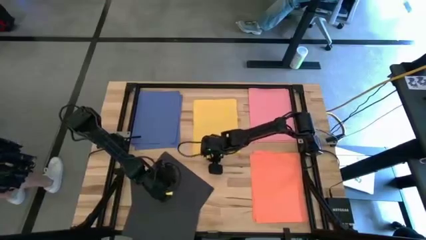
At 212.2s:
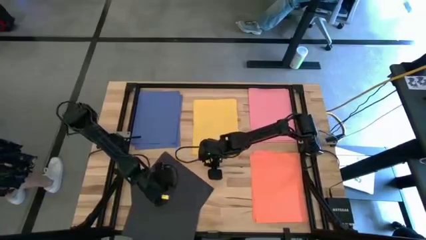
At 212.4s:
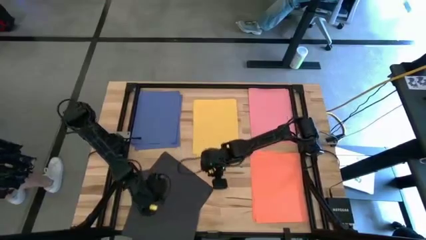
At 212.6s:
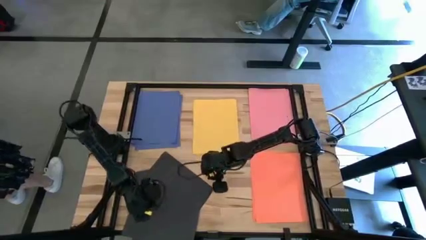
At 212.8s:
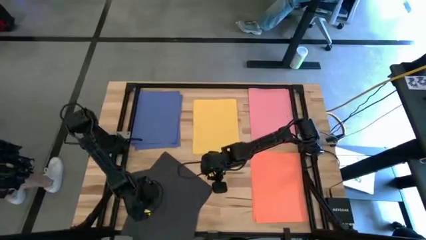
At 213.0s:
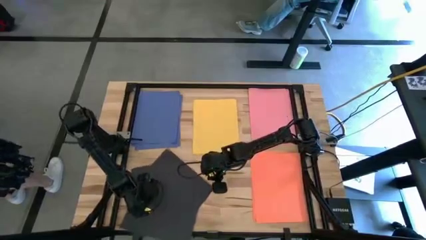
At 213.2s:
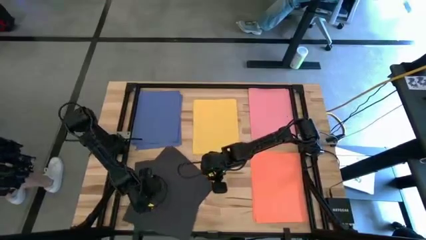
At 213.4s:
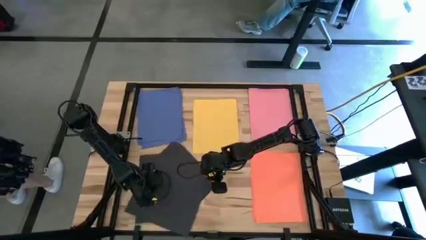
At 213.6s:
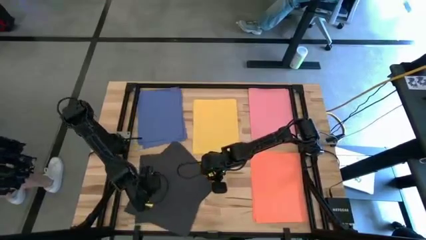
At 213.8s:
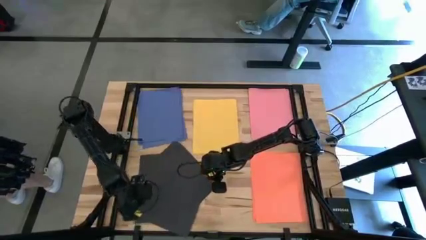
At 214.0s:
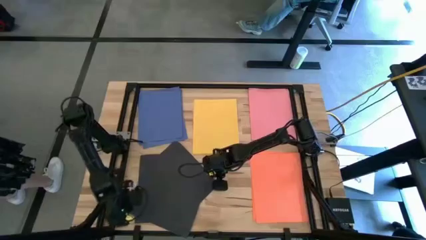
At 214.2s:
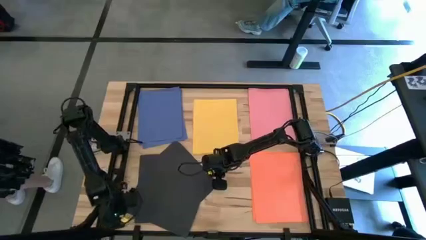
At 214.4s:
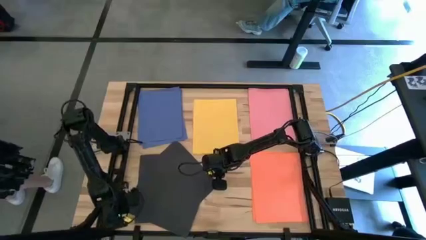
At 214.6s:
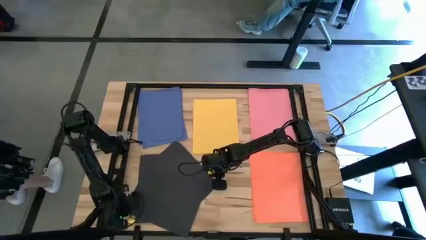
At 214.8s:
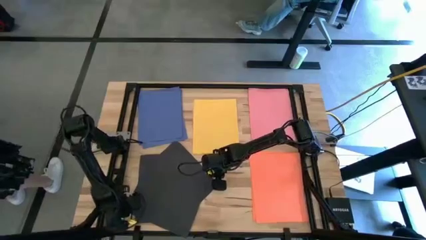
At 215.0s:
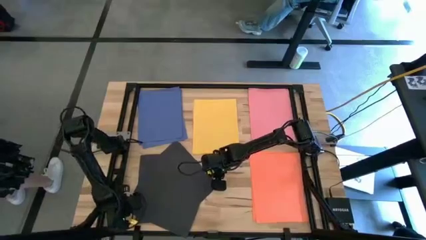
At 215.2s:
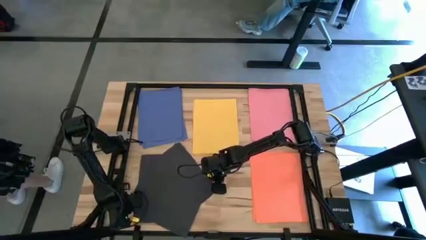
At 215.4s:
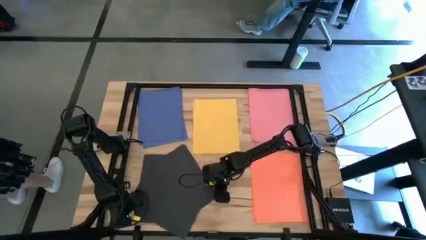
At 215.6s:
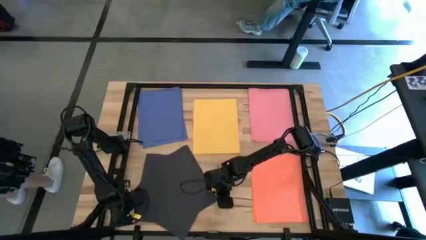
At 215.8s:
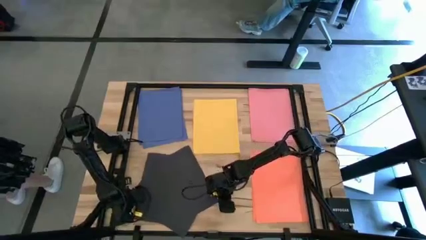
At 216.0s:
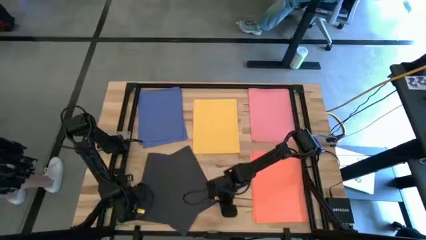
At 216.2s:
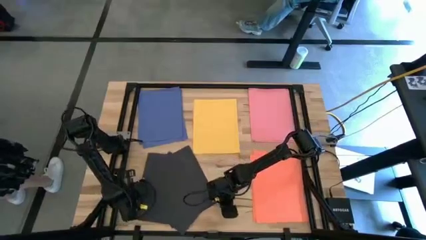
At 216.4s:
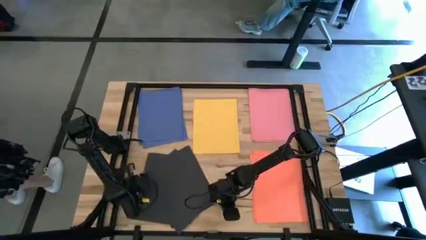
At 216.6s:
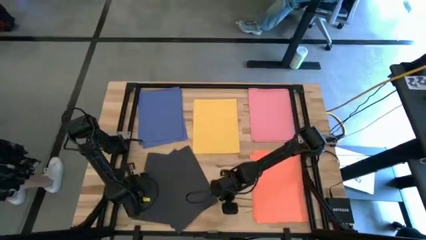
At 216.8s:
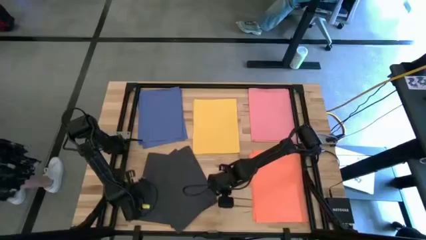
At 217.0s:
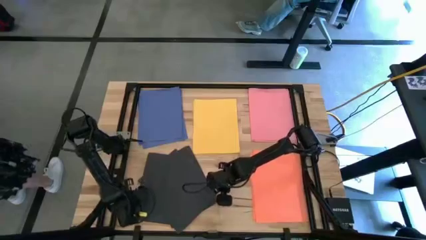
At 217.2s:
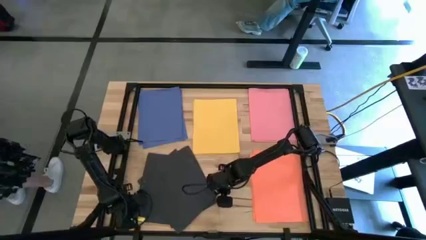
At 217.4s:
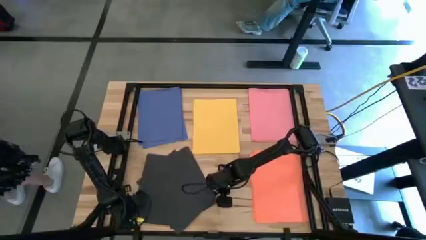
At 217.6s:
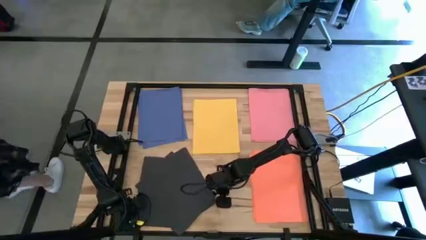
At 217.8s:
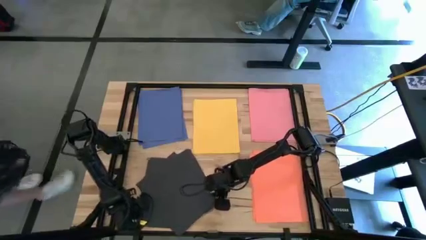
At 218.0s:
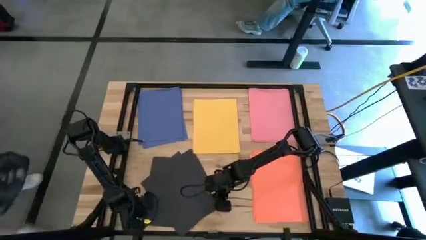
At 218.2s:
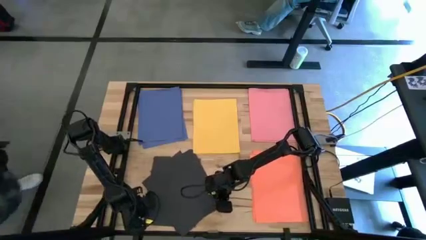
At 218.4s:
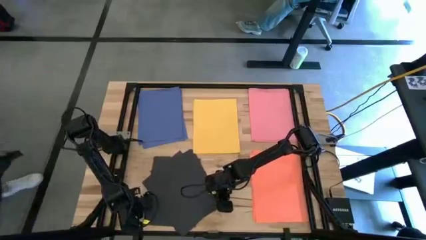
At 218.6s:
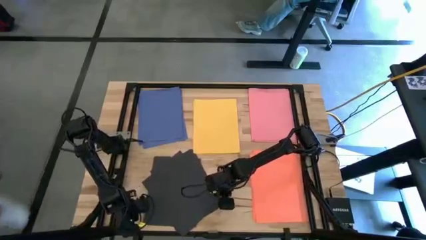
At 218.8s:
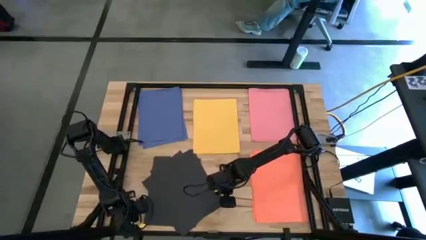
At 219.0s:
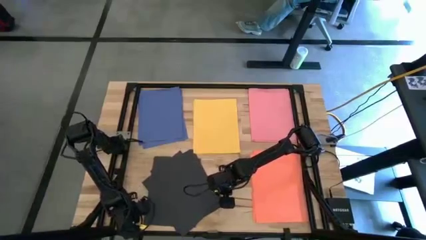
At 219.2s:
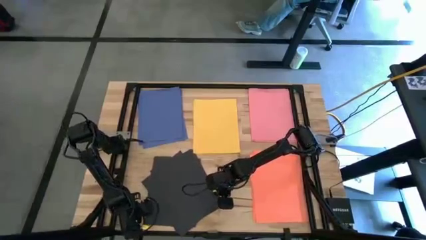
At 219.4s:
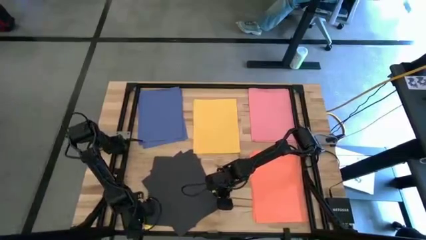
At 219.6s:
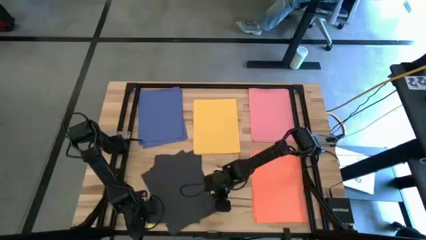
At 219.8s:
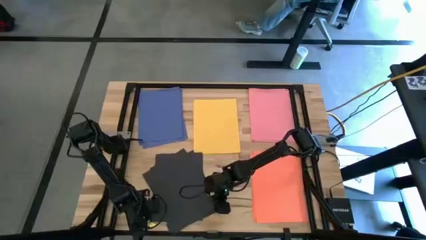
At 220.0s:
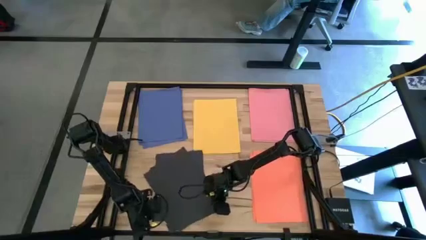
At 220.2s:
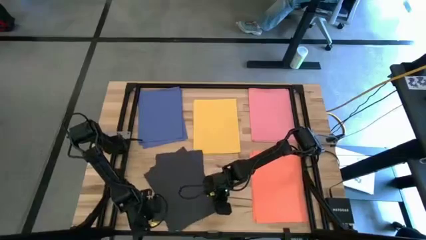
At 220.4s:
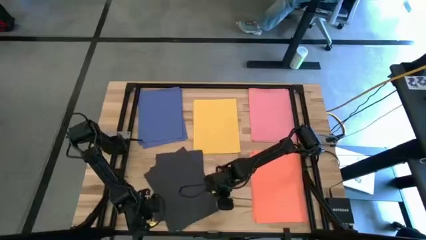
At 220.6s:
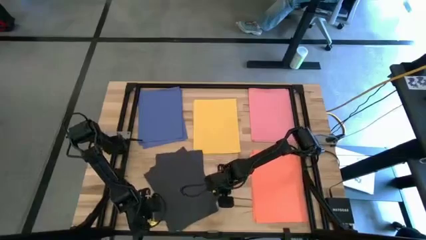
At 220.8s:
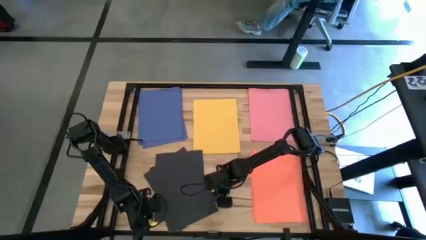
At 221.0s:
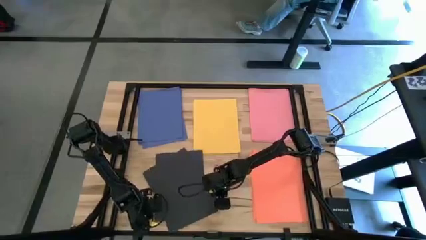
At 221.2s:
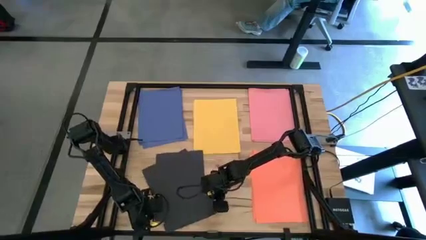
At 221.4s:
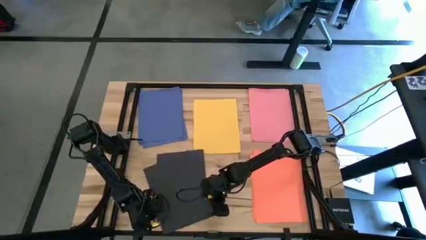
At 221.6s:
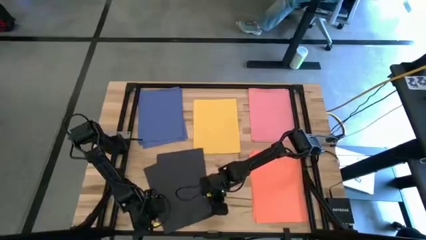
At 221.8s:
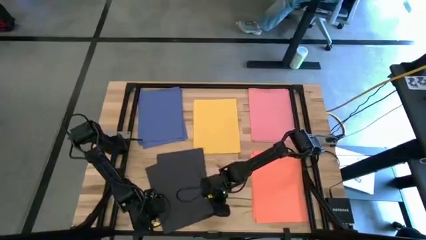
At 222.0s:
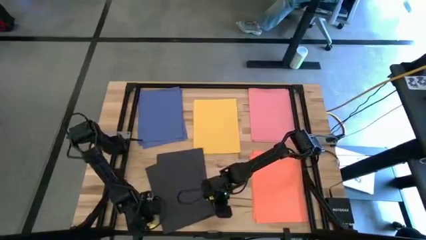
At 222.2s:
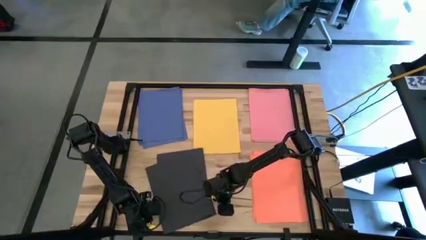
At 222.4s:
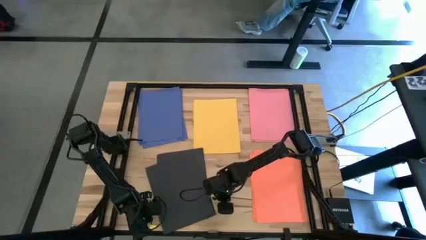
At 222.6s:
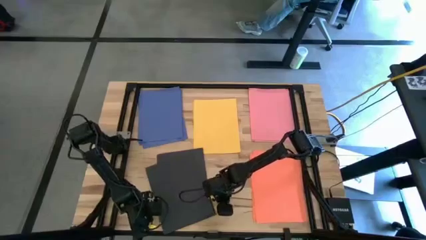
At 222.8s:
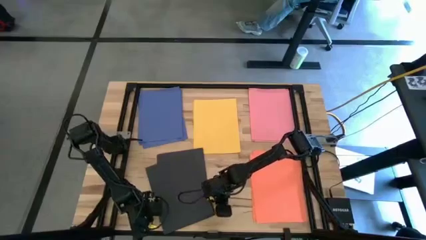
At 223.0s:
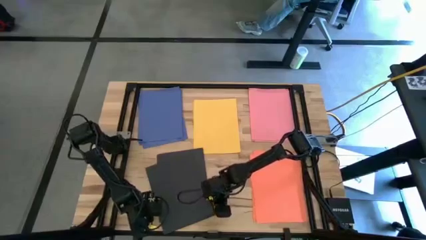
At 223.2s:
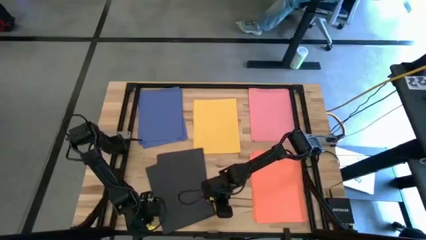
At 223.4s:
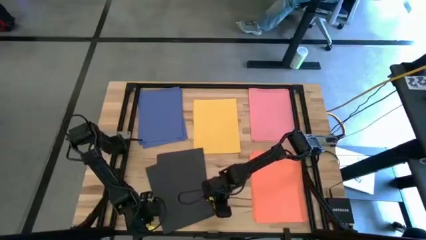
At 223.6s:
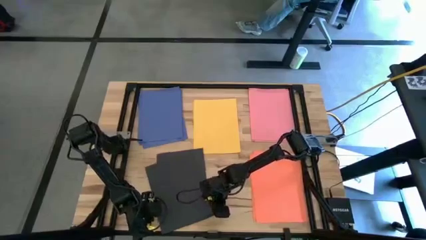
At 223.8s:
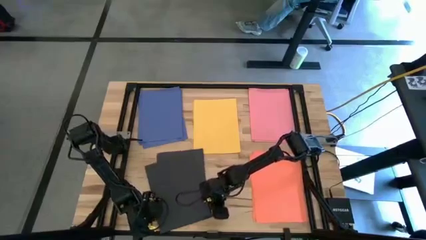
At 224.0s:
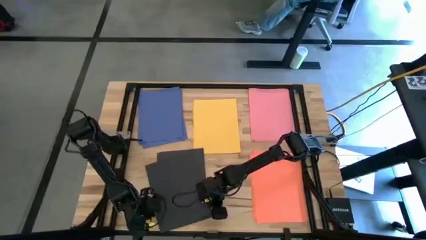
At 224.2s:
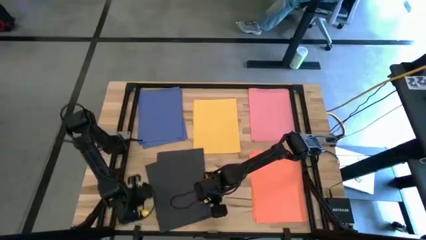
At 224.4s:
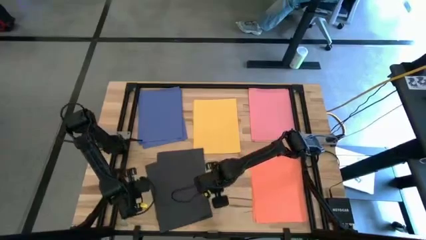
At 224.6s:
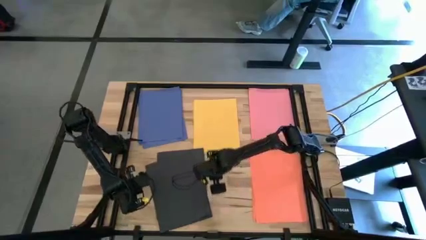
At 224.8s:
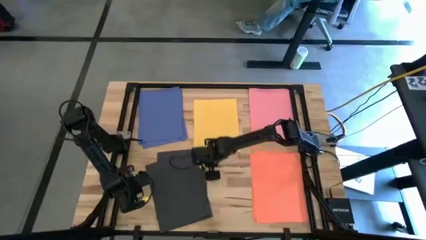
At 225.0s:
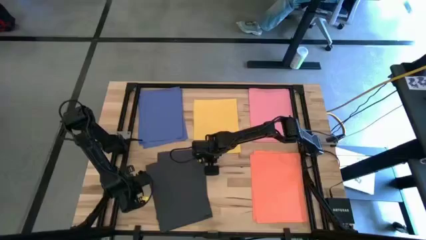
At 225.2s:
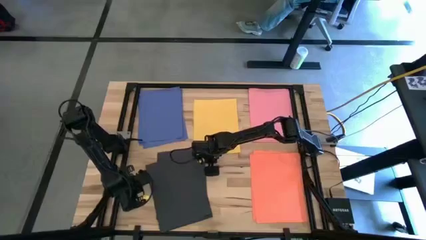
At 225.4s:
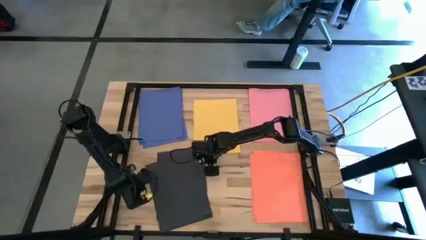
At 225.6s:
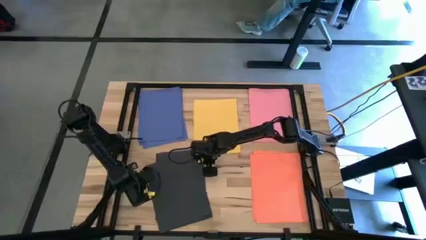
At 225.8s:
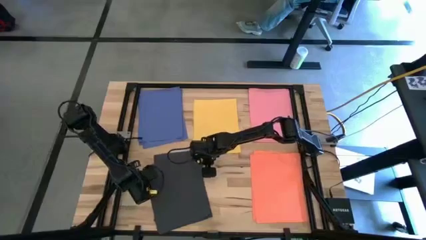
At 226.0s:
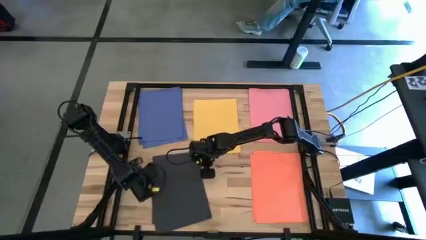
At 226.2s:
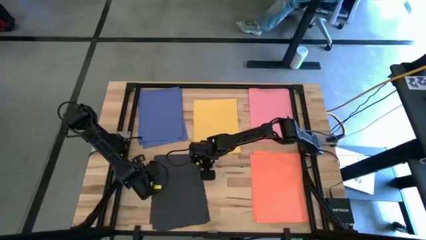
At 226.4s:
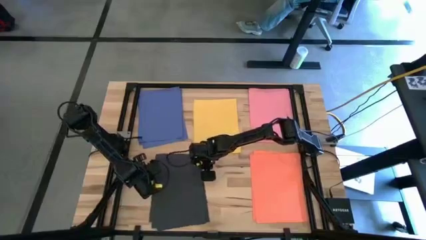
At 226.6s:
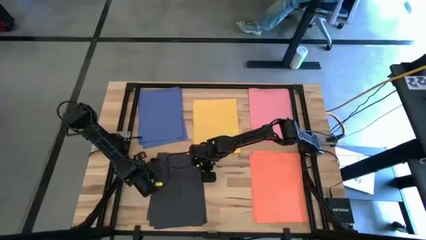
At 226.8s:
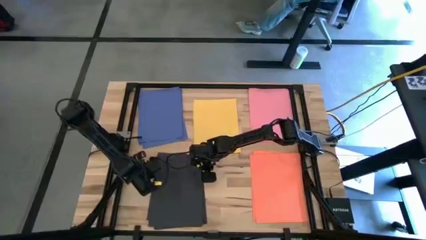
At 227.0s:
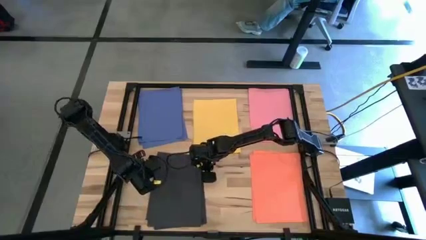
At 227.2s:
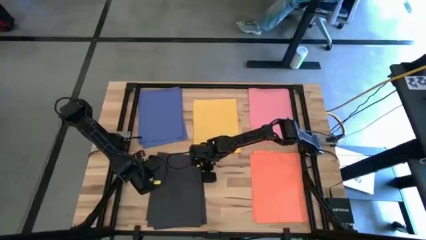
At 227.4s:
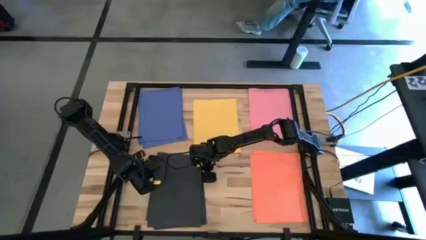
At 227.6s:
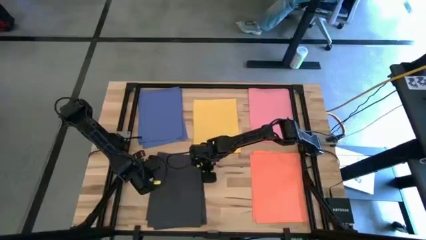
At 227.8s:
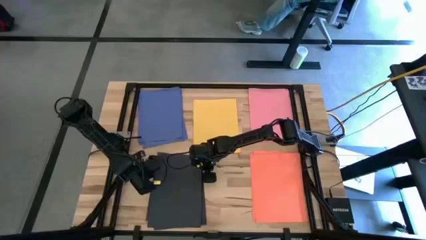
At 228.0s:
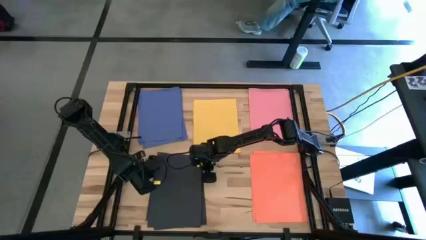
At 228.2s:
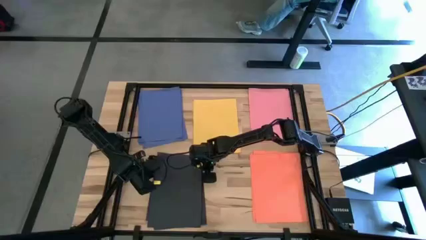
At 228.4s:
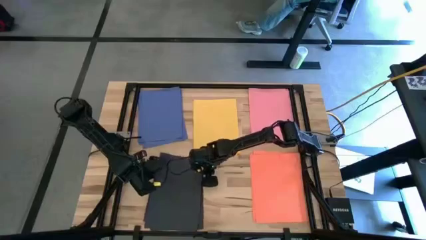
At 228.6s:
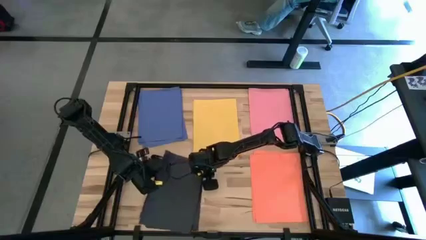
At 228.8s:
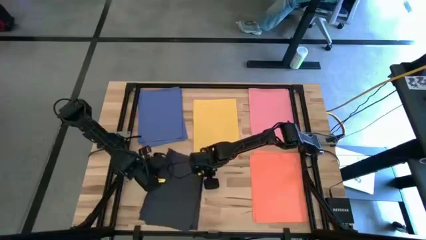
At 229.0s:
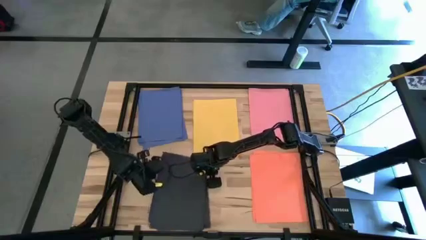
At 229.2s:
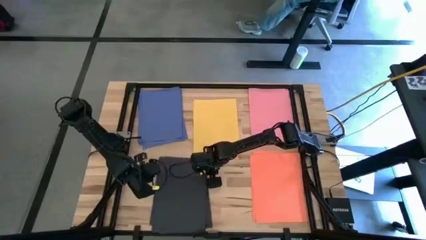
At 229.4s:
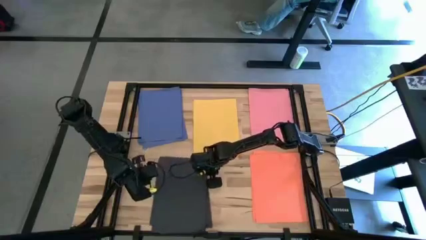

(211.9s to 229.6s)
Task: Organize paper
Move the black papers to the bottom left of the table
